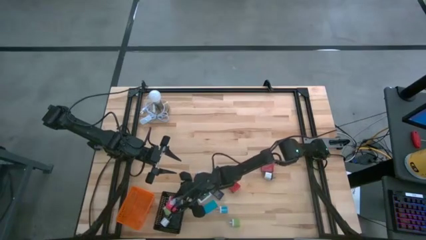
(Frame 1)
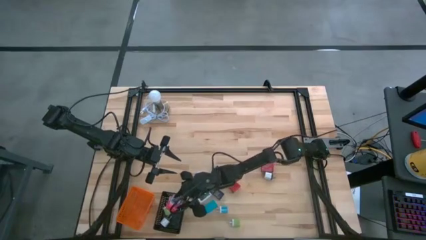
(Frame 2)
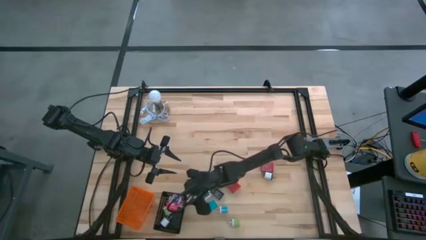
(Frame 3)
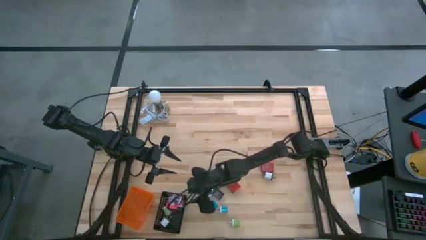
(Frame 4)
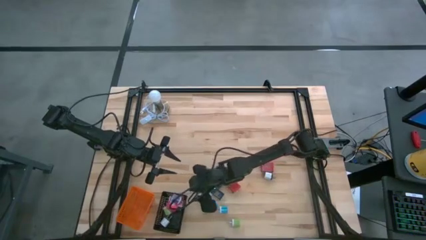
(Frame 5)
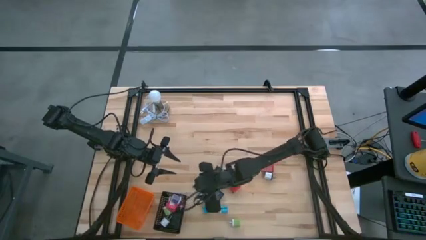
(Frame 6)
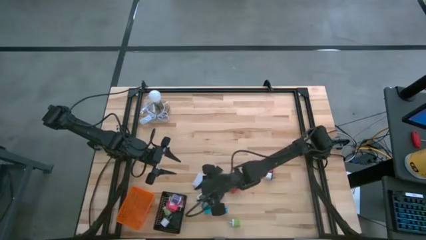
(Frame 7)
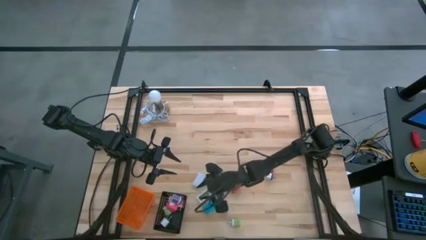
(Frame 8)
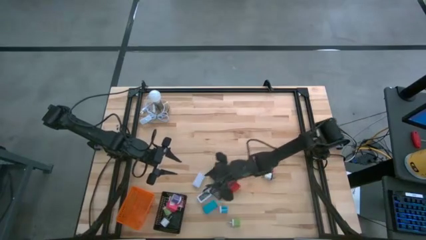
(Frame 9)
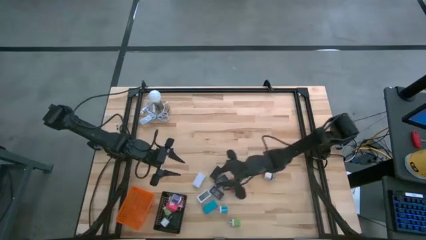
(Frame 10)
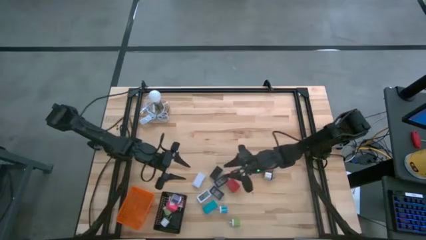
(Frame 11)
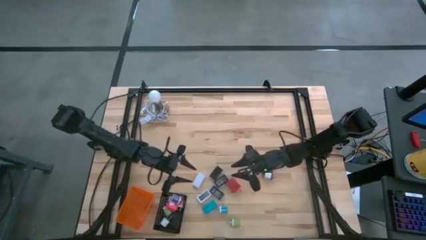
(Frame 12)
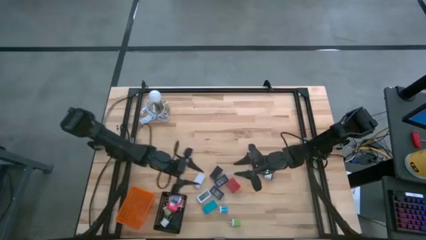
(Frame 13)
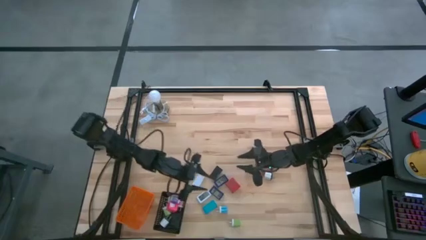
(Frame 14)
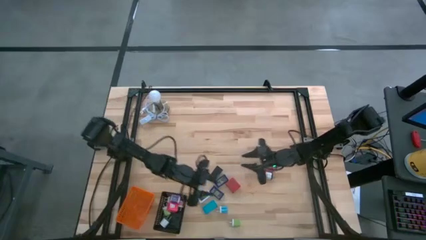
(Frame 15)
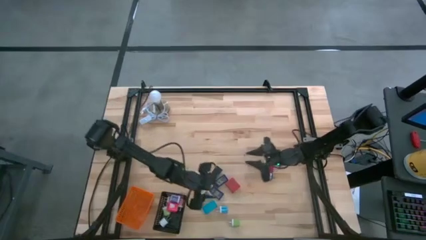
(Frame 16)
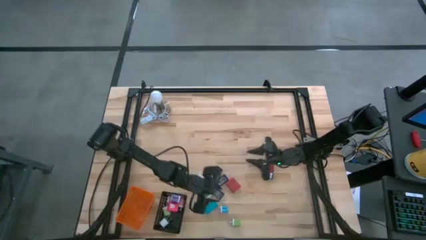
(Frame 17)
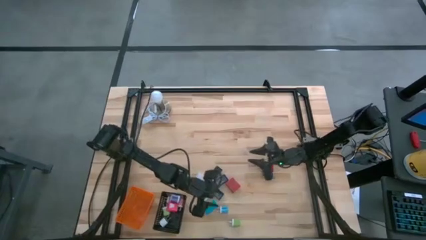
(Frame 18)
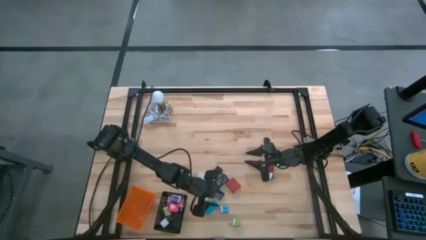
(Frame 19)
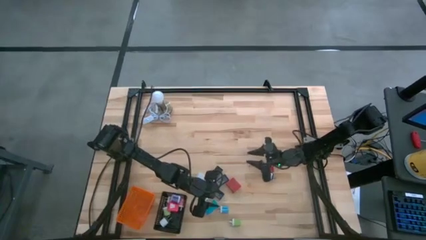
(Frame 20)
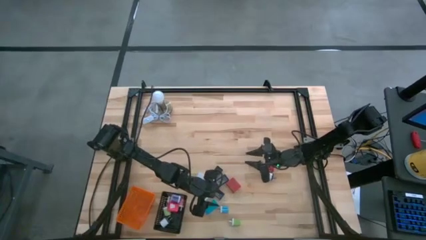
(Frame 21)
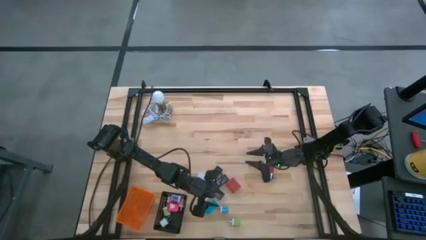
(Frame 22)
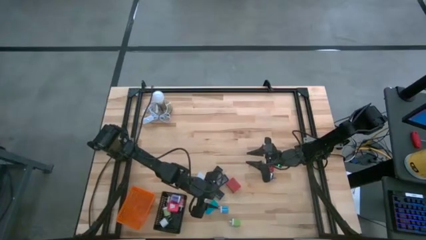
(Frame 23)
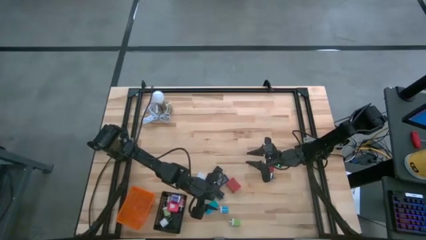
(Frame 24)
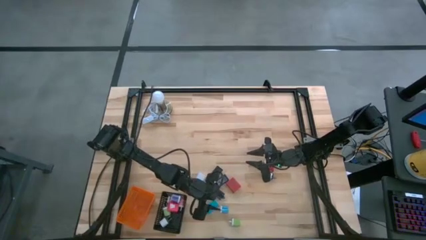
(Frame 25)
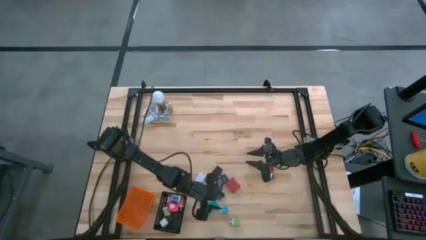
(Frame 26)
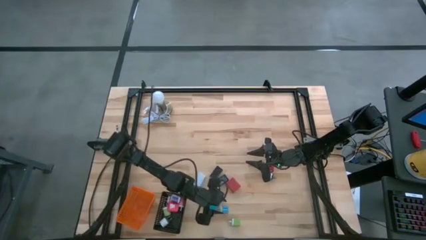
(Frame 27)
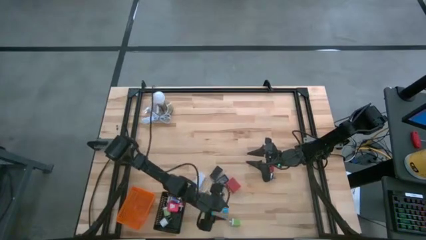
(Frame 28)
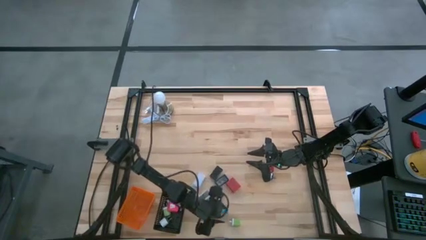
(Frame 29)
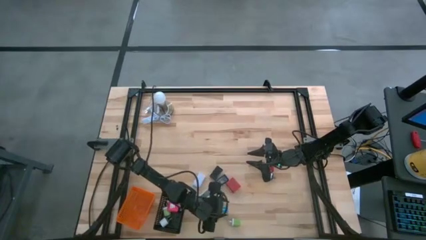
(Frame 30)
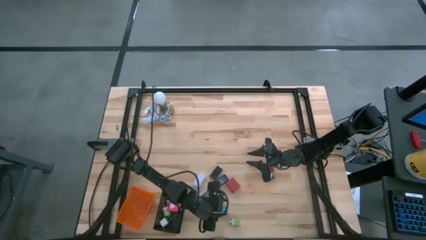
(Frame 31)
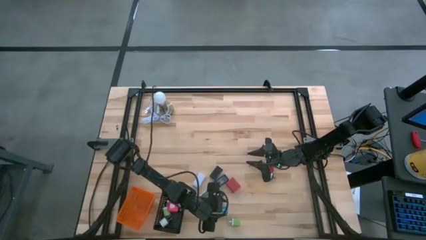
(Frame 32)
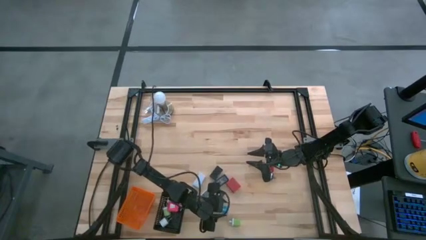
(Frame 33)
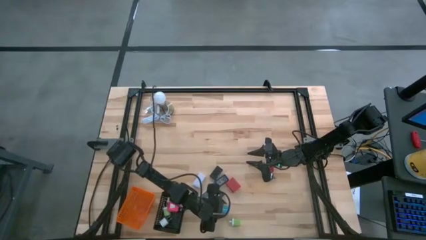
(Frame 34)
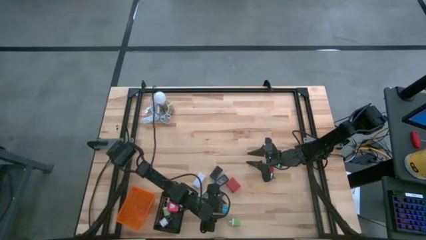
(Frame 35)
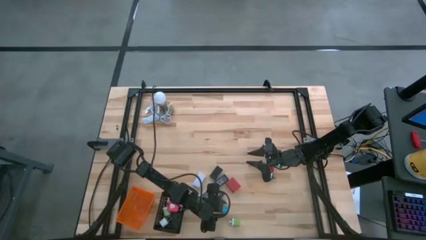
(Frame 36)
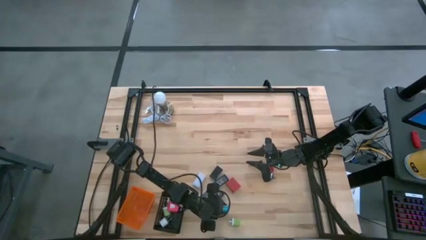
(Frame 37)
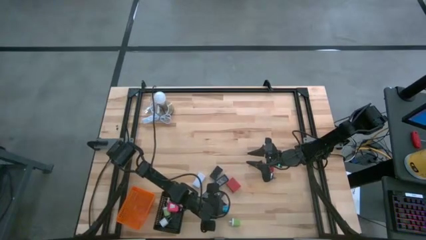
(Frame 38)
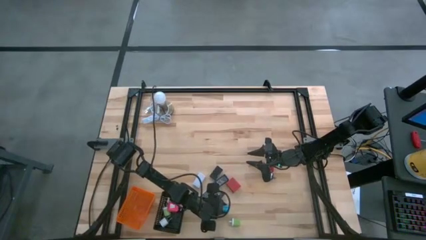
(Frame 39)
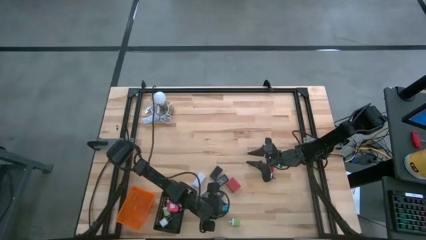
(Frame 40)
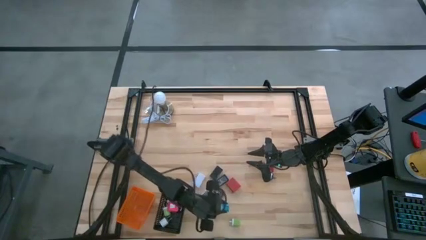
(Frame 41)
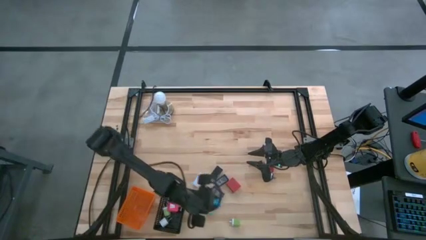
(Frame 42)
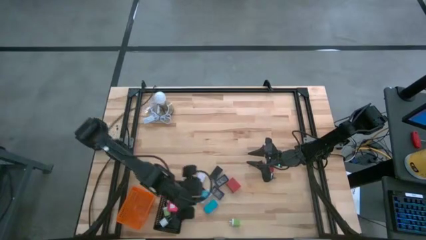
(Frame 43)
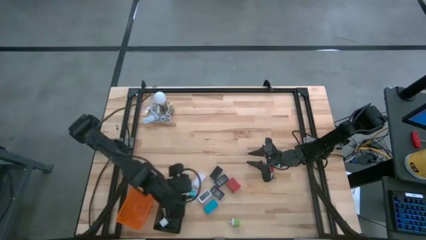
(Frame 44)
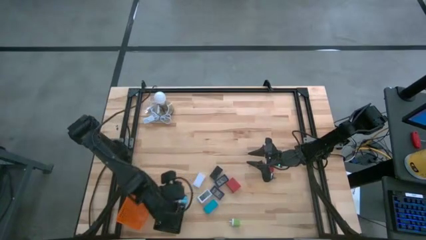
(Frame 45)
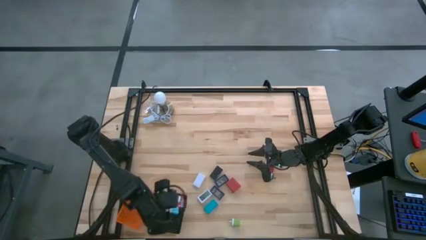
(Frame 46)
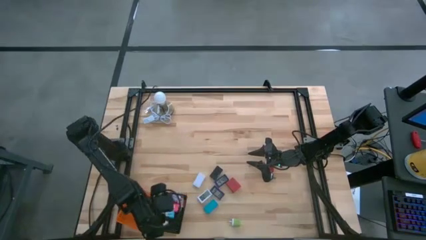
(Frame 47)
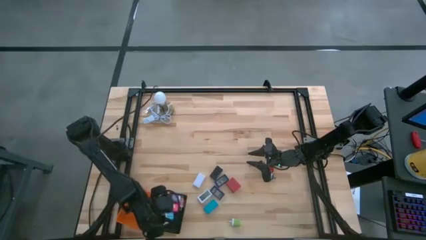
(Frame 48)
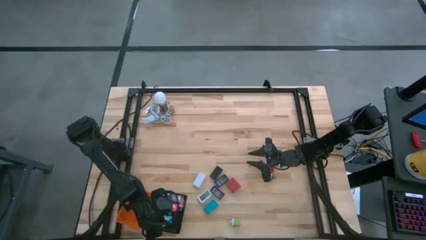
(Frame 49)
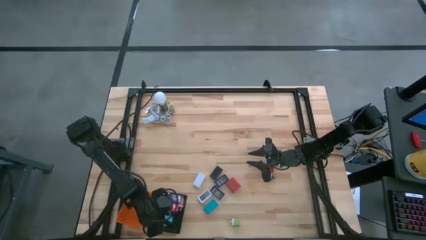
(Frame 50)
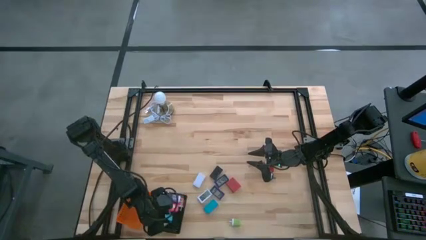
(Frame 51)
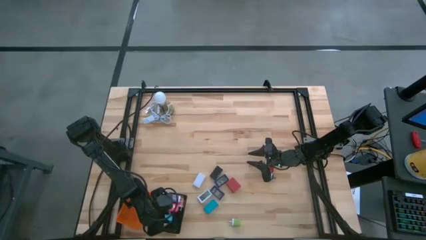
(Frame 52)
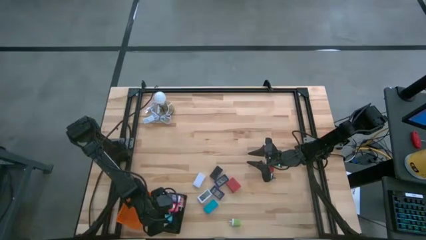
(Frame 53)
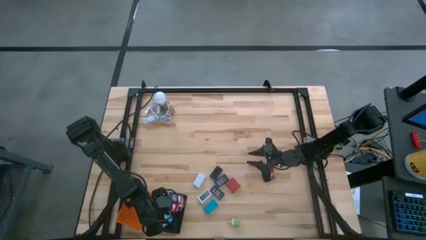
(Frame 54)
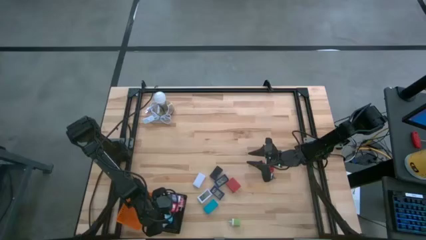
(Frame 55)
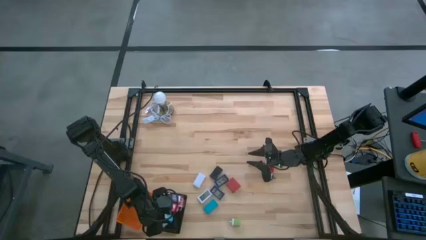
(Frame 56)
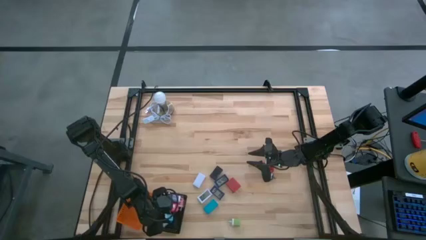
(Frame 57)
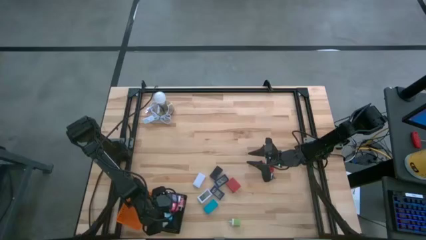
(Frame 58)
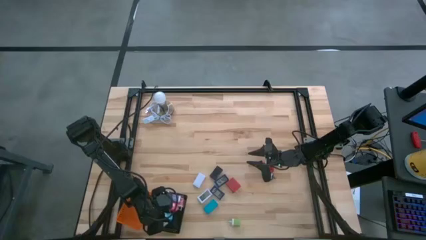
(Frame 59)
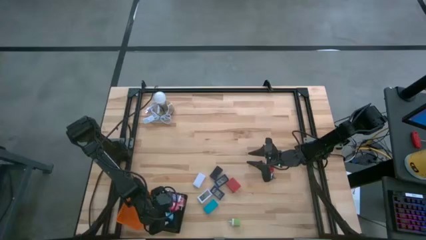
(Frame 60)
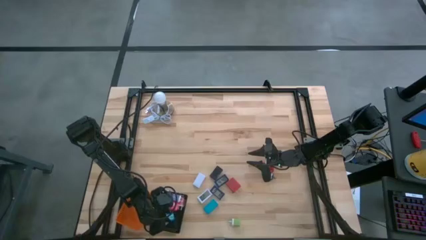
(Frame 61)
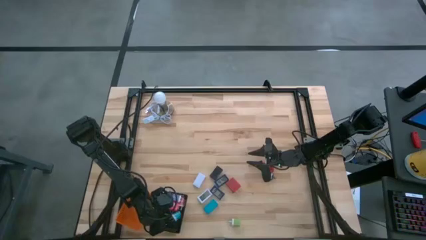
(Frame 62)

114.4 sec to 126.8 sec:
Task: Pick & Place Office items
Put the blue charger adapter into the black basket
